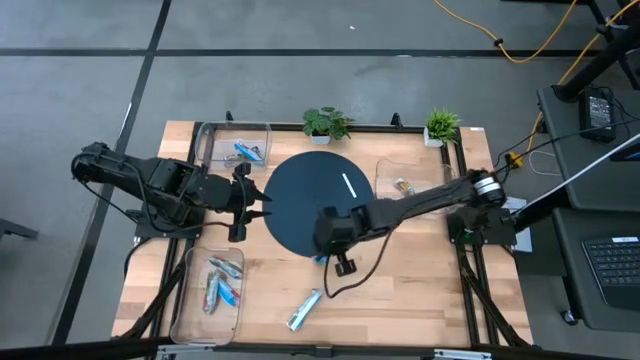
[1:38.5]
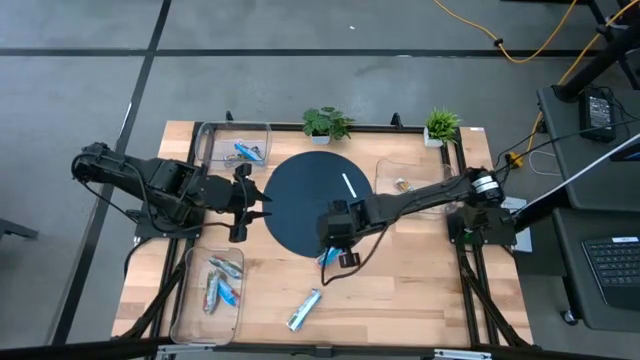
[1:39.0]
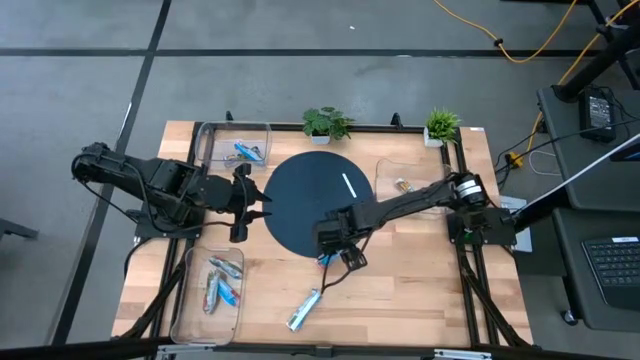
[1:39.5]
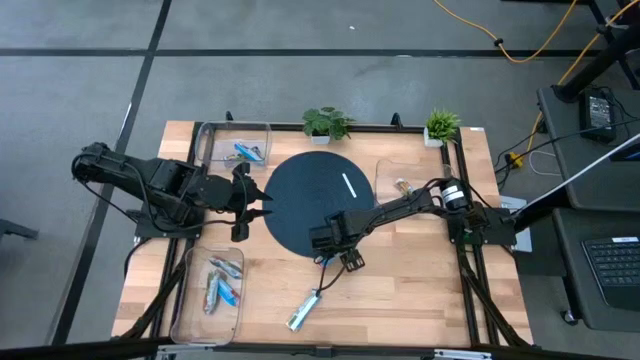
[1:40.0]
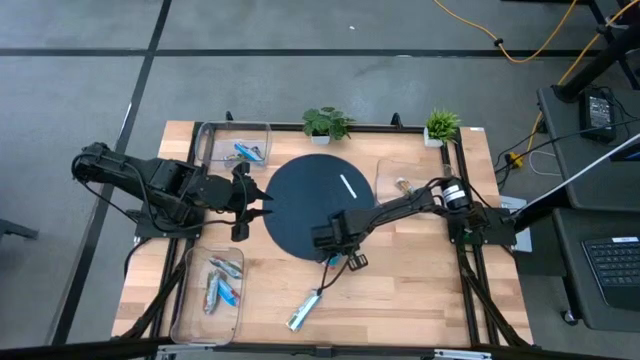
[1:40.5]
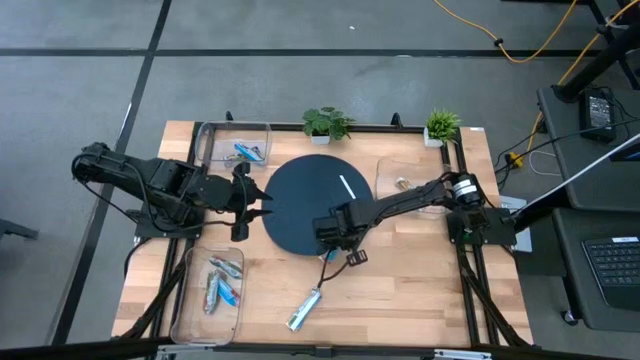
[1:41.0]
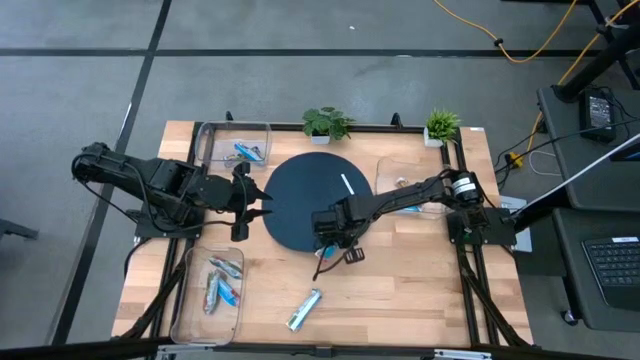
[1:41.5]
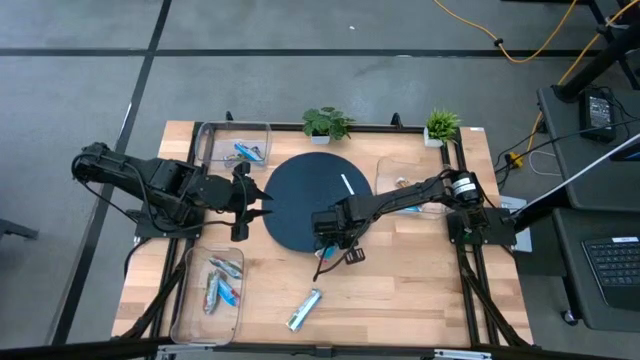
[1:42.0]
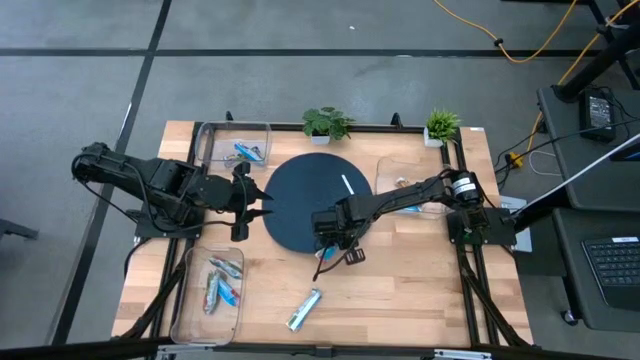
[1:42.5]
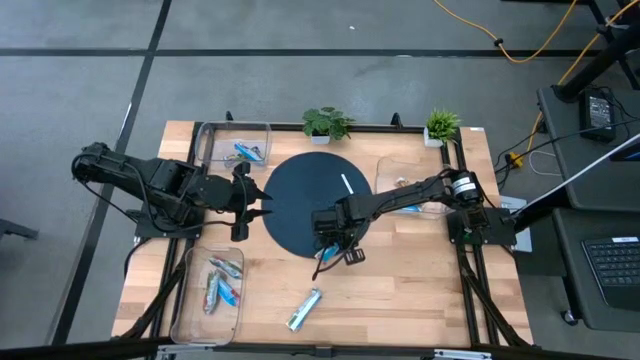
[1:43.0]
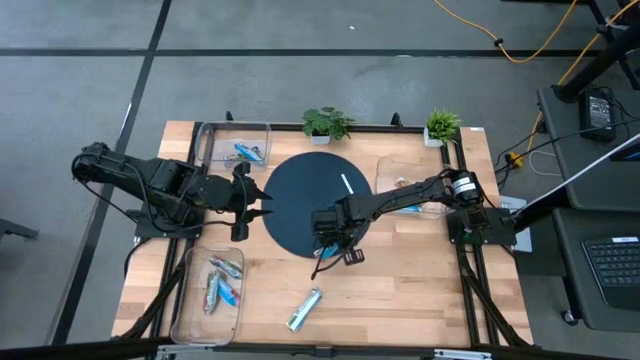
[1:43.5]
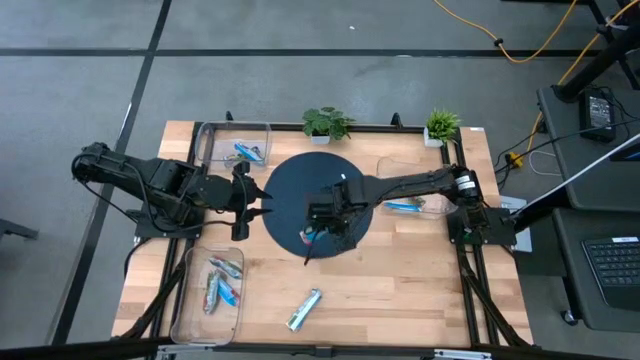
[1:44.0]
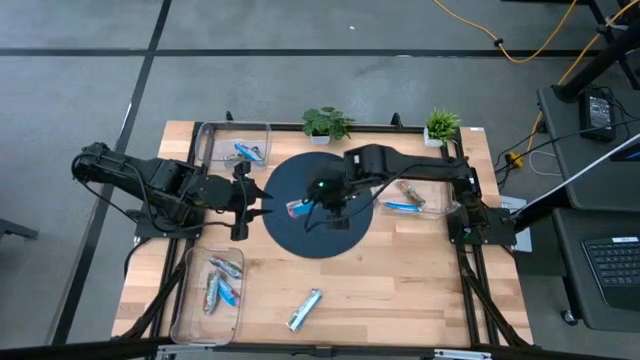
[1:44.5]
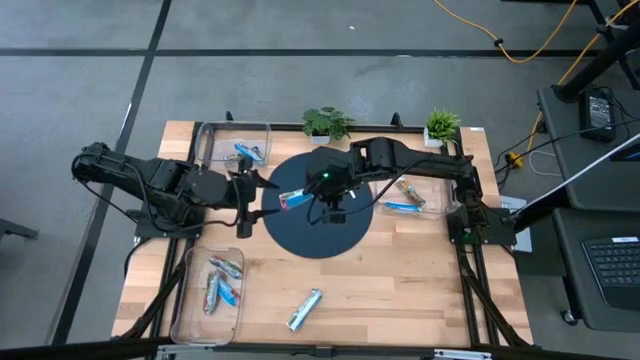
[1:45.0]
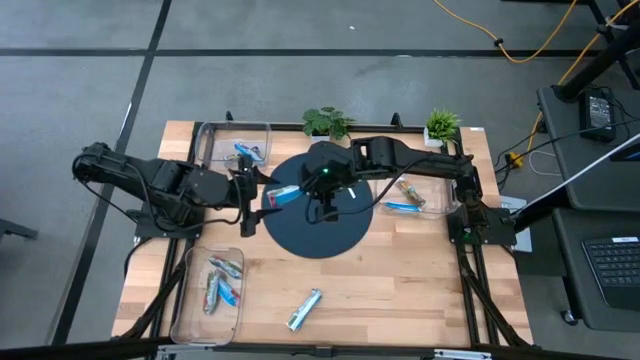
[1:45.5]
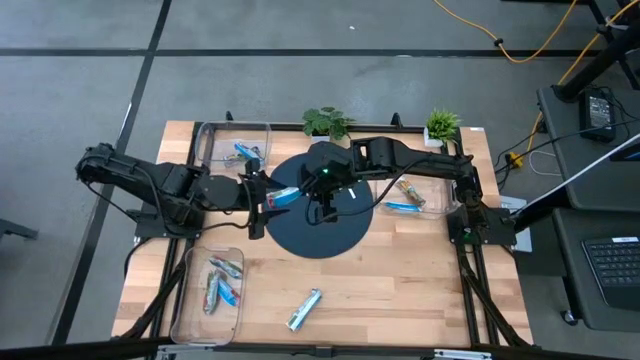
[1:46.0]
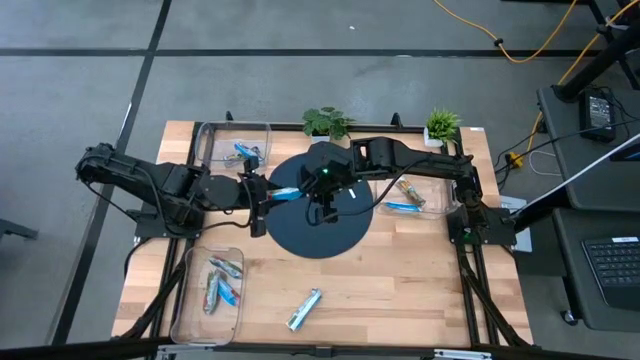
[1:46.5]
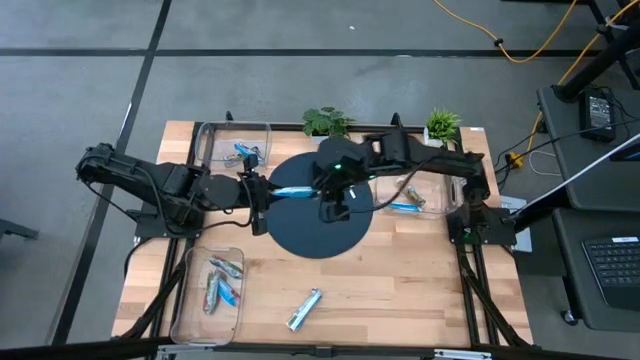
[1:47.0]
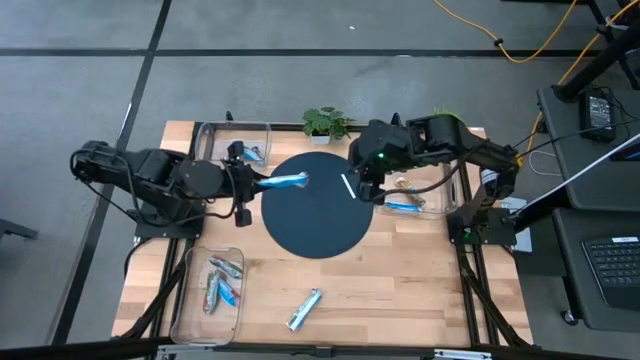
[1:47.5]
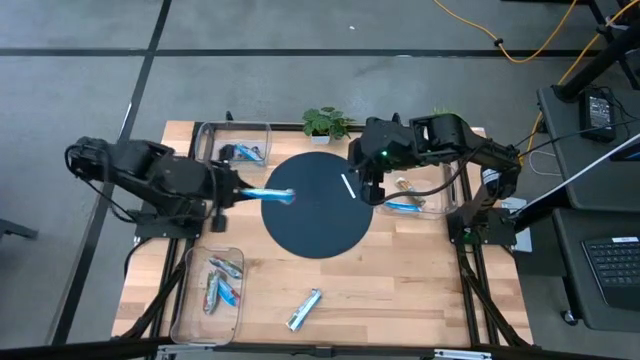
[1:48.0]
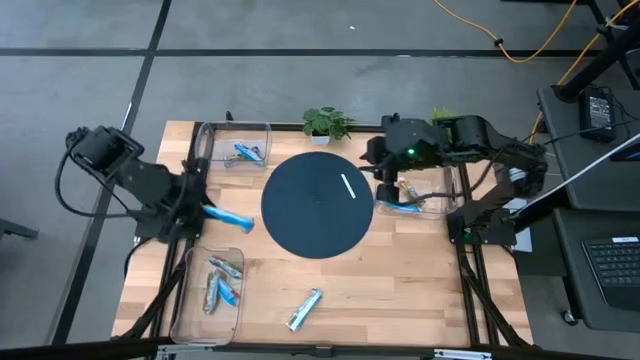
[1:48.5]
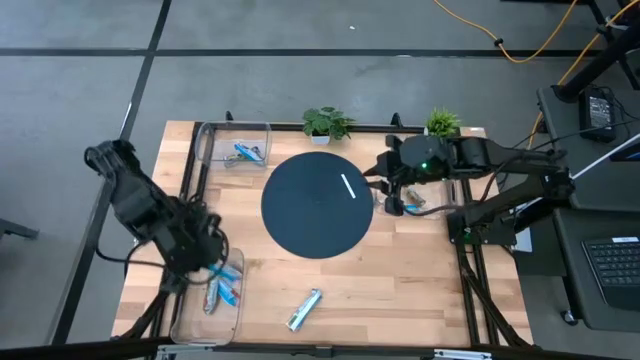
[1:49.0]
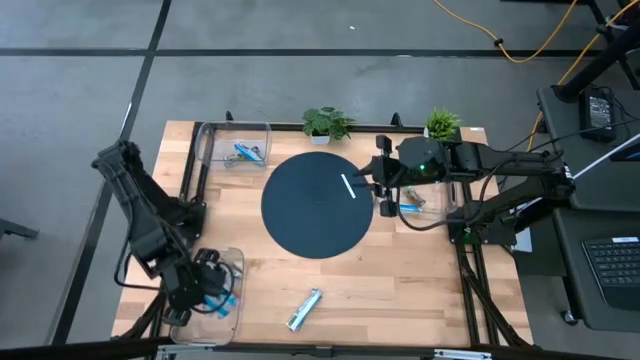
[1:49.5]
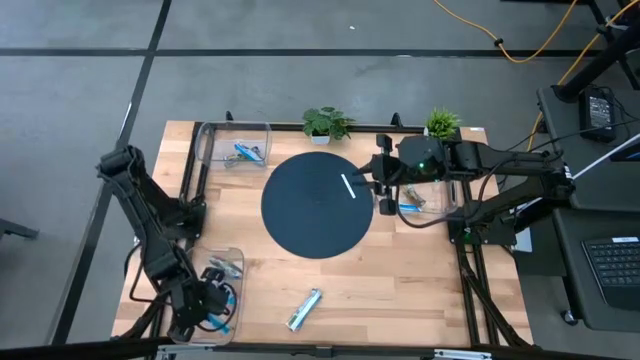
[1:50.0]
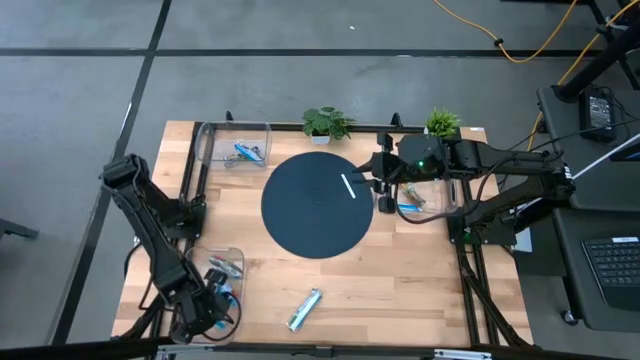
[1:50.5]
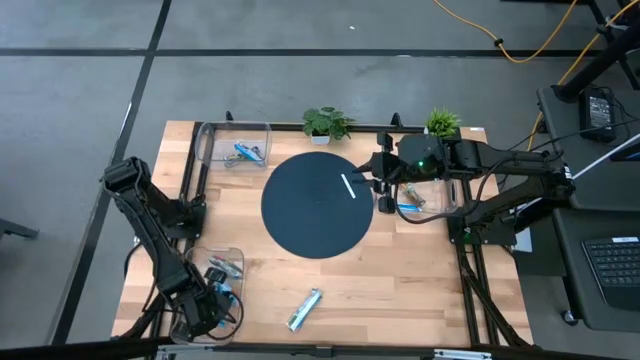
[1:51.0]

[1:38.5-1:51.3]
Task: Pick and place Granola Bars by type
Put the red granola bar into the bottom transparent bin

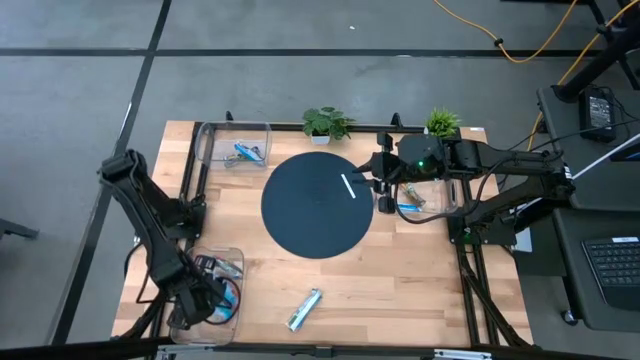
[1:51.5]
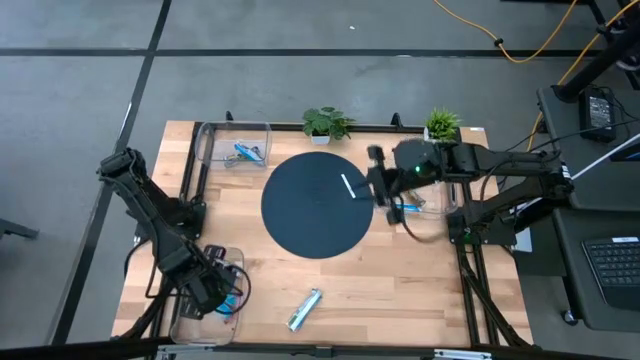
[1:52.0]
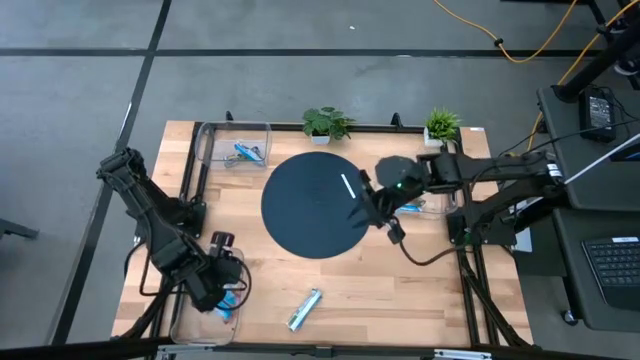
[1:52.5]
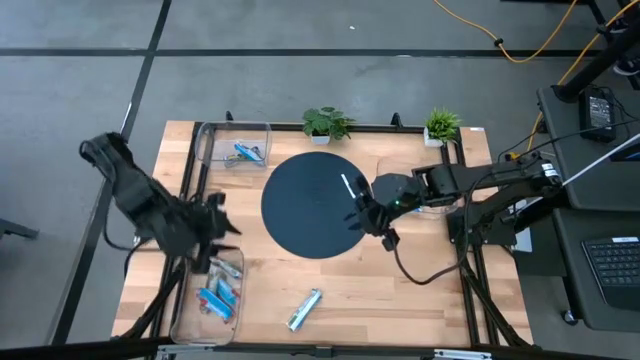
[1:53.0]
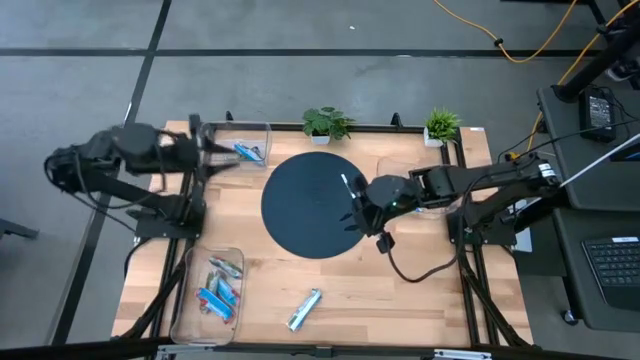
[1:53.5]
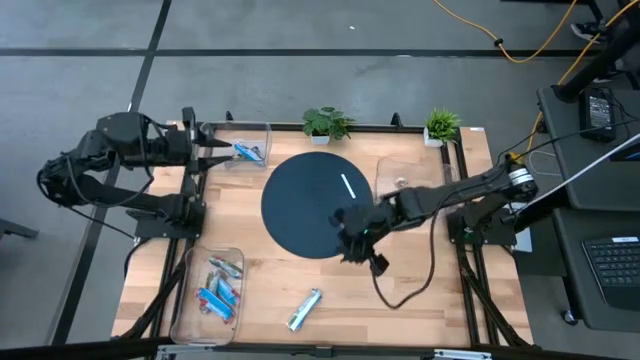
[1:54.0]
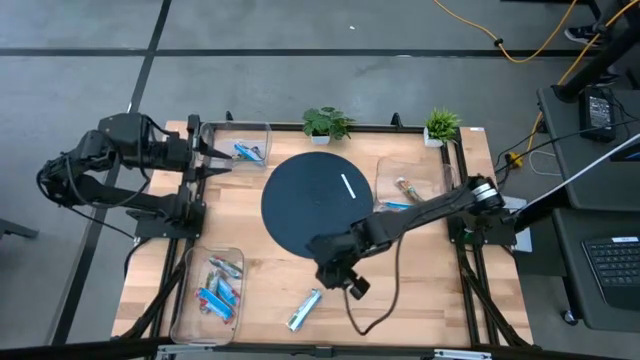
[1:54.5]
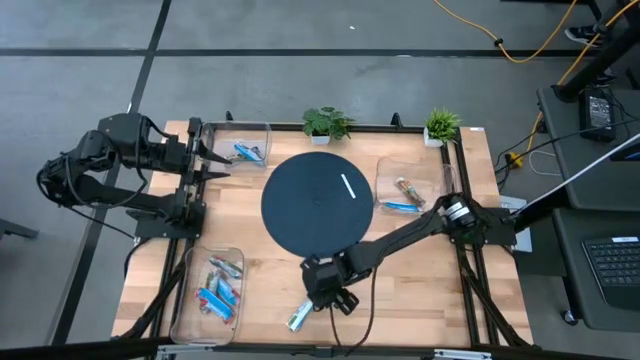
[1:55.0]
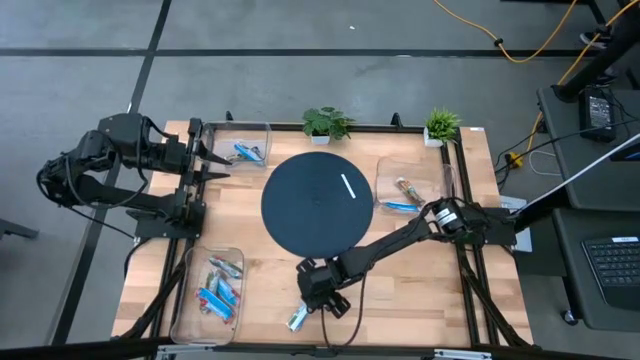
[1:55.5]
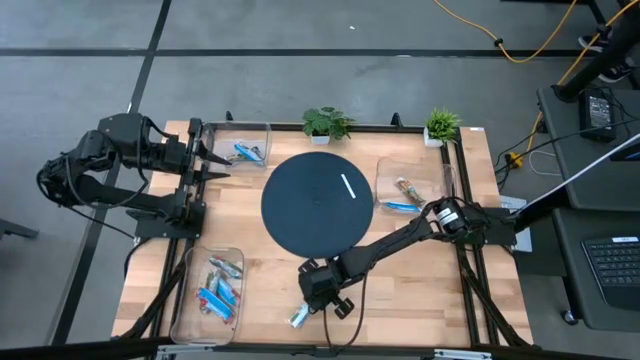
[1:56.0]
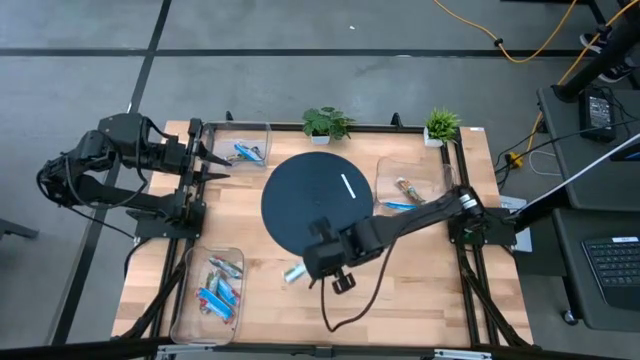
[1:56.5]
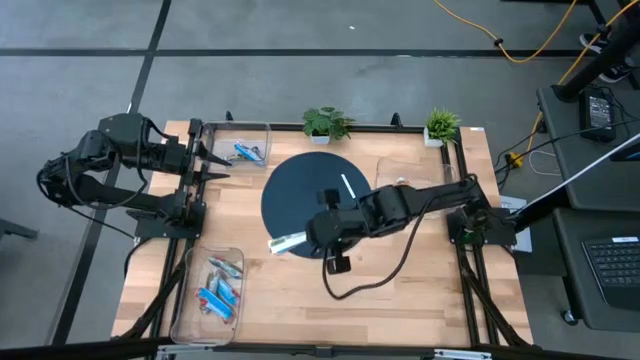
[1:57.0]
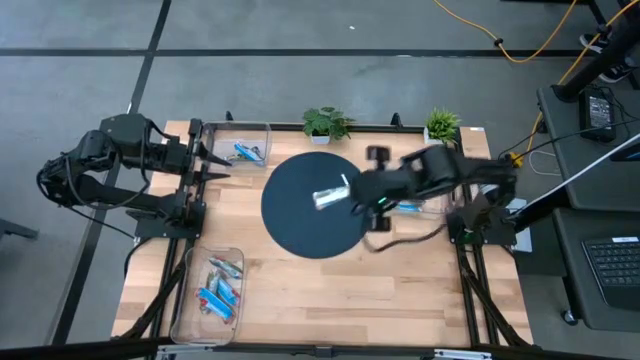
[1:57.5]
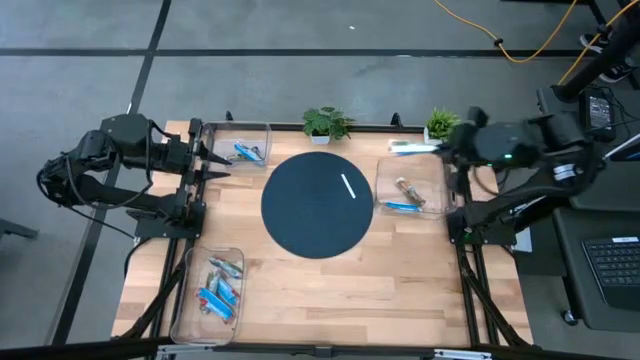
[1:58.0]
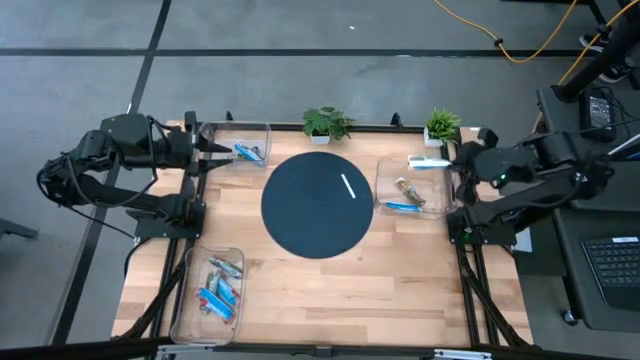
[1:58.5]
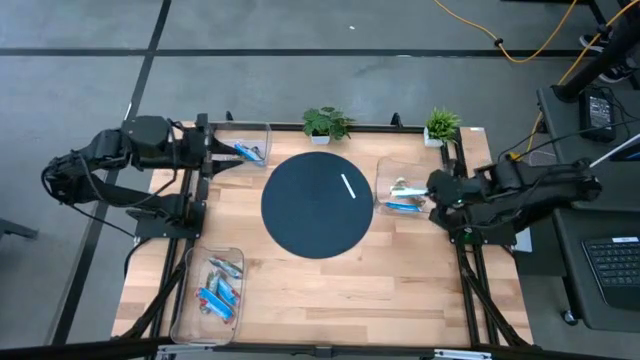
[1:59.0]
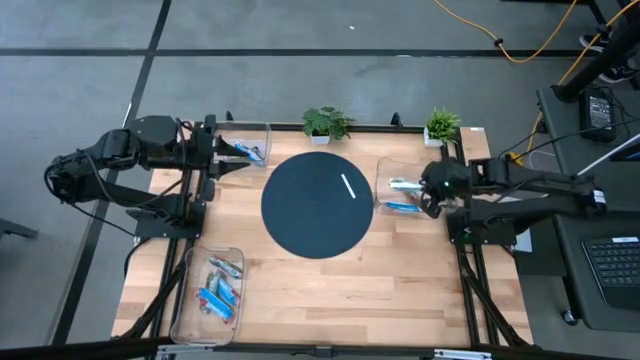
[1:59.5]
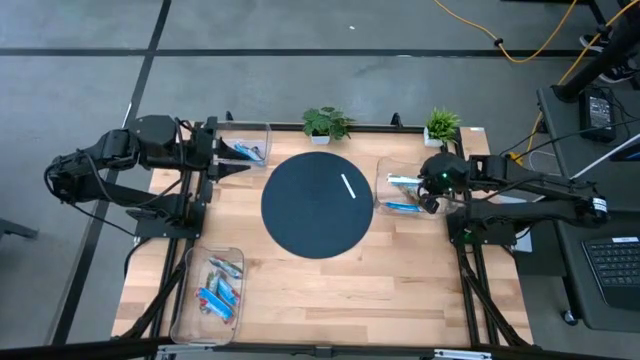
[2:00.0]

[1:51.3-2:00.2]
Put the yellow granola bar into the top right transparent bin
